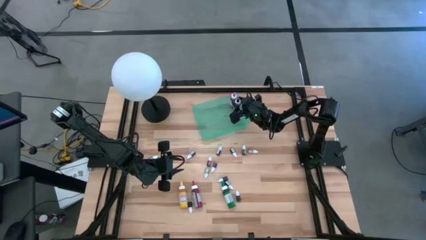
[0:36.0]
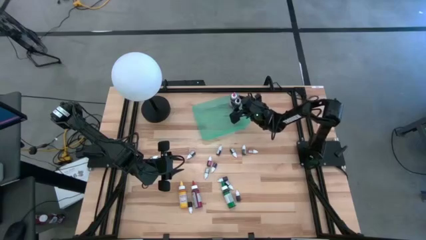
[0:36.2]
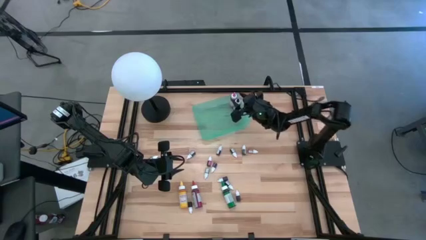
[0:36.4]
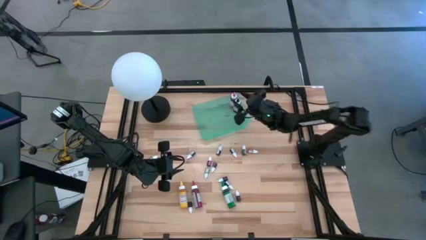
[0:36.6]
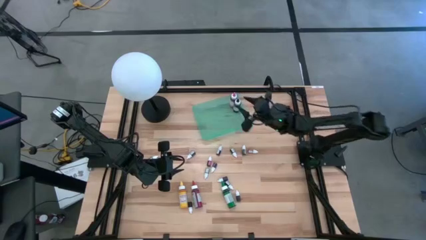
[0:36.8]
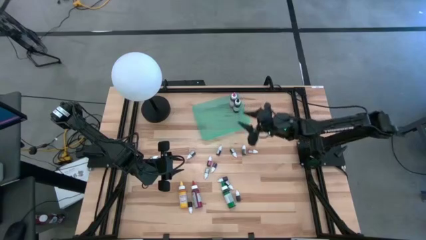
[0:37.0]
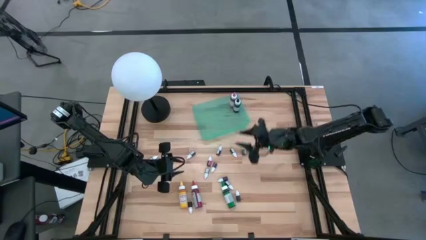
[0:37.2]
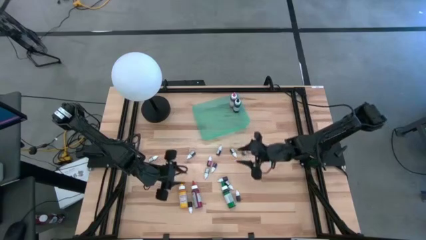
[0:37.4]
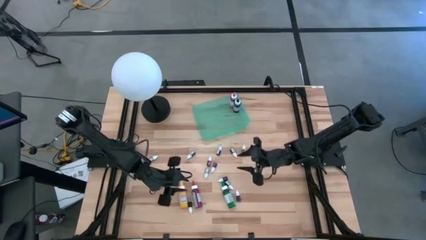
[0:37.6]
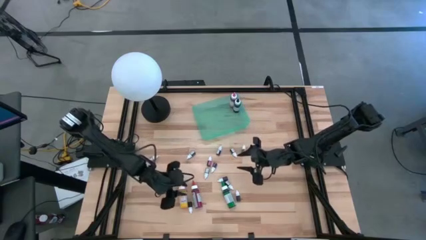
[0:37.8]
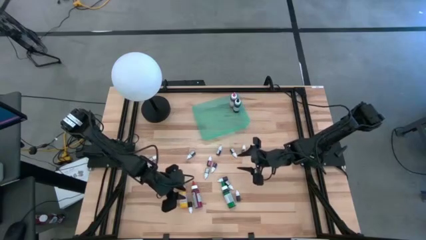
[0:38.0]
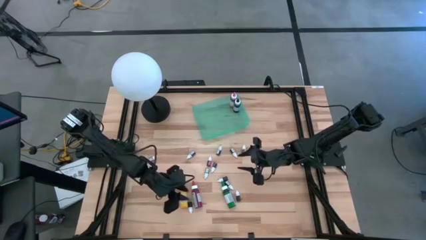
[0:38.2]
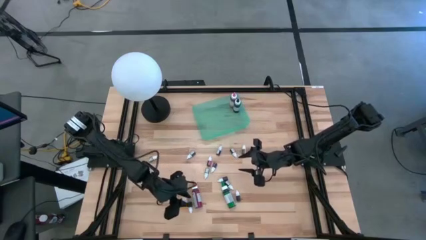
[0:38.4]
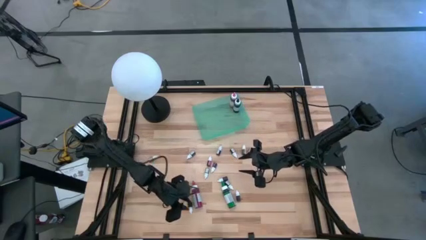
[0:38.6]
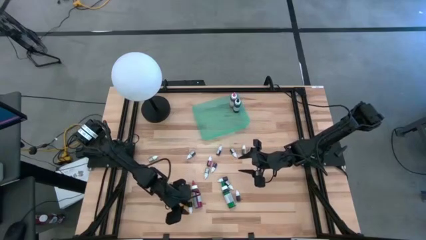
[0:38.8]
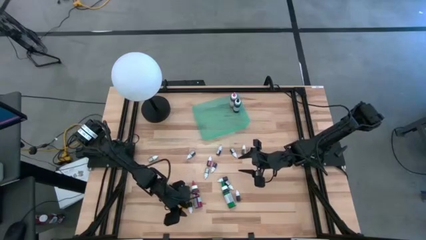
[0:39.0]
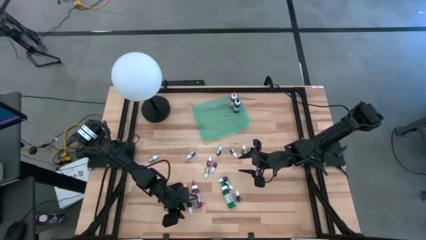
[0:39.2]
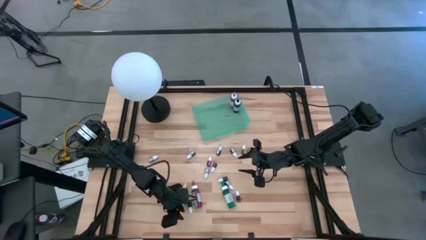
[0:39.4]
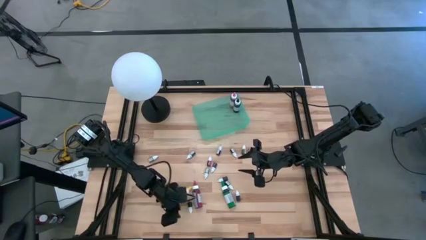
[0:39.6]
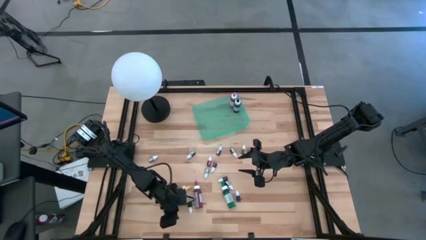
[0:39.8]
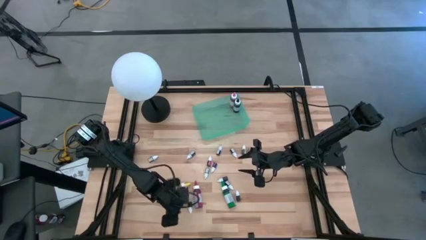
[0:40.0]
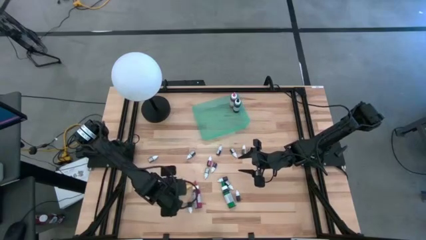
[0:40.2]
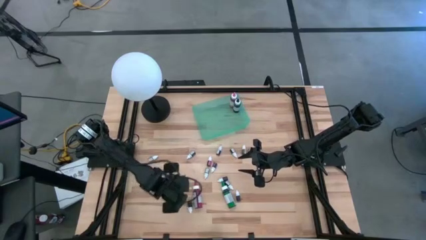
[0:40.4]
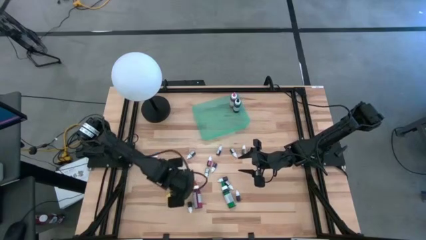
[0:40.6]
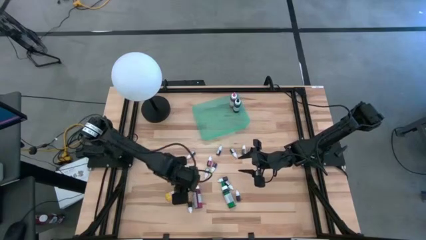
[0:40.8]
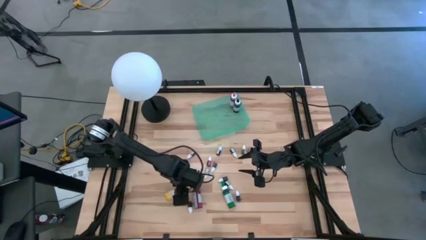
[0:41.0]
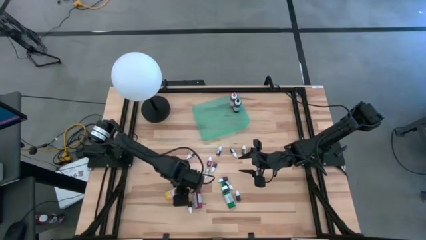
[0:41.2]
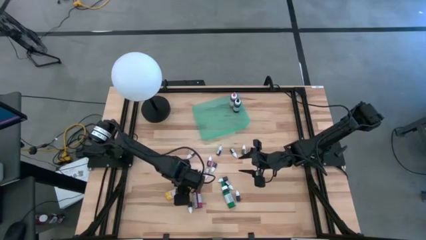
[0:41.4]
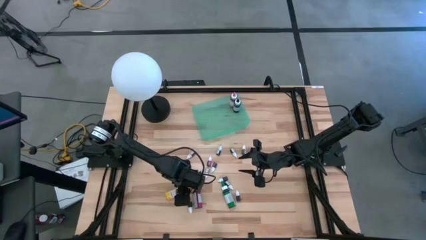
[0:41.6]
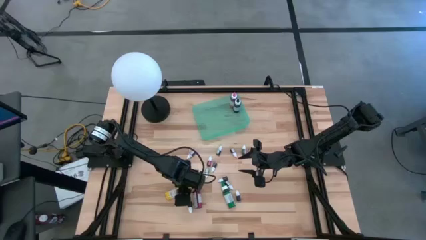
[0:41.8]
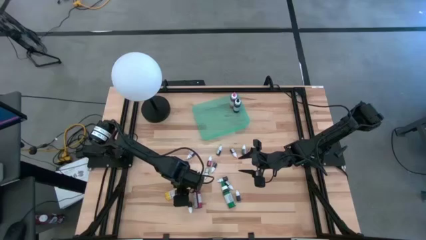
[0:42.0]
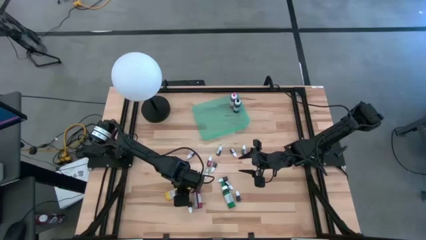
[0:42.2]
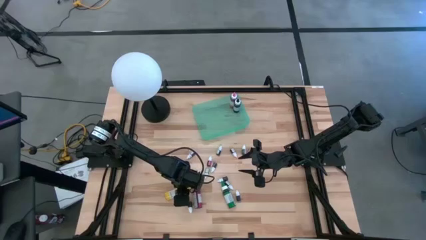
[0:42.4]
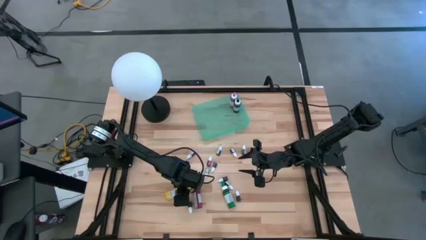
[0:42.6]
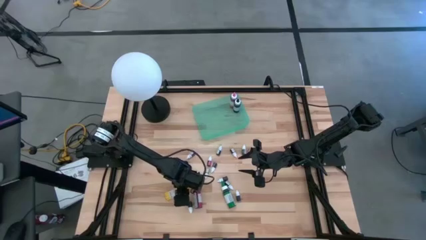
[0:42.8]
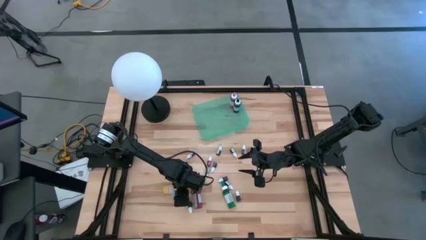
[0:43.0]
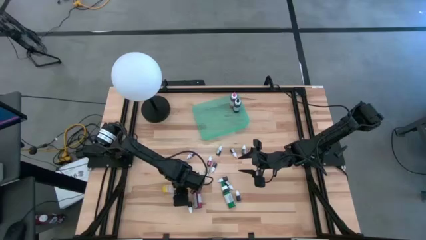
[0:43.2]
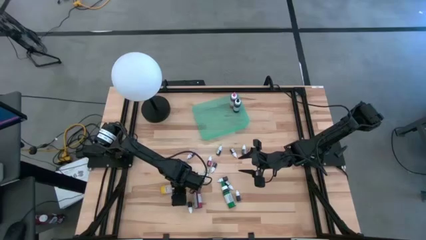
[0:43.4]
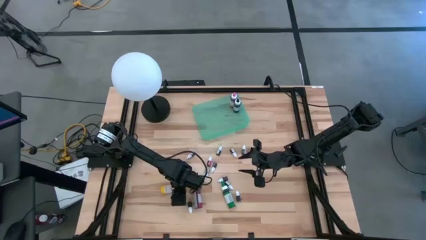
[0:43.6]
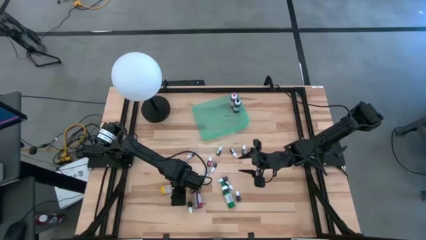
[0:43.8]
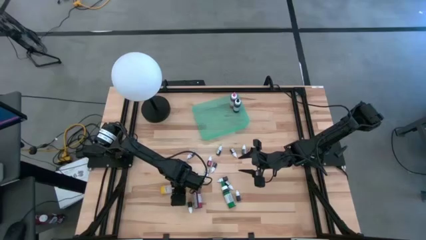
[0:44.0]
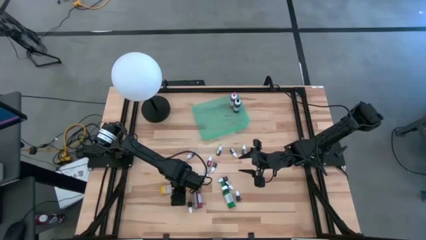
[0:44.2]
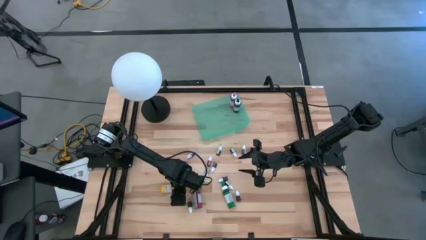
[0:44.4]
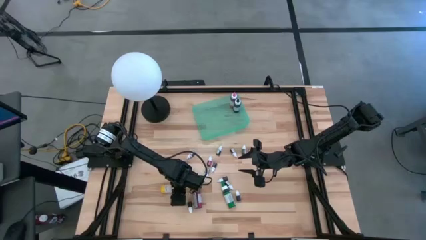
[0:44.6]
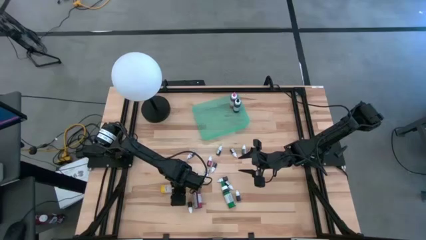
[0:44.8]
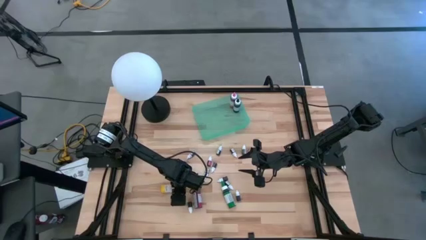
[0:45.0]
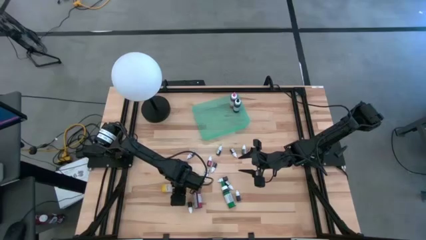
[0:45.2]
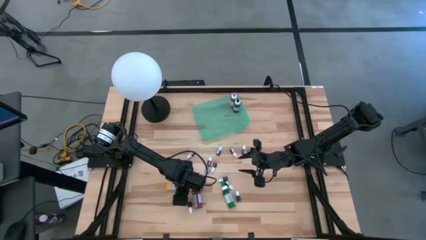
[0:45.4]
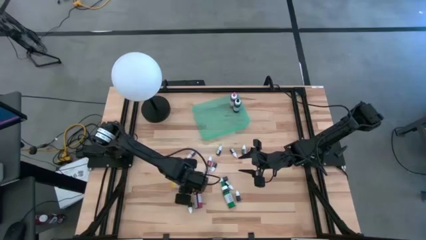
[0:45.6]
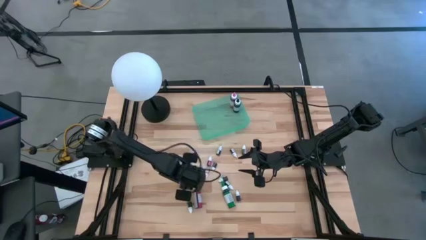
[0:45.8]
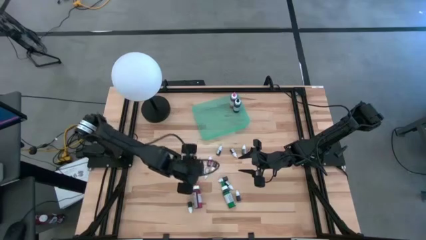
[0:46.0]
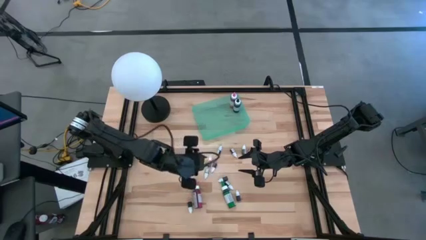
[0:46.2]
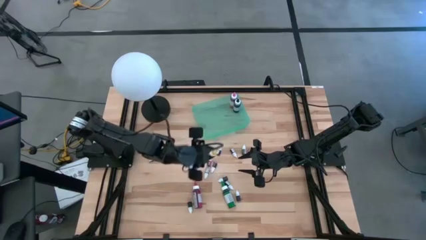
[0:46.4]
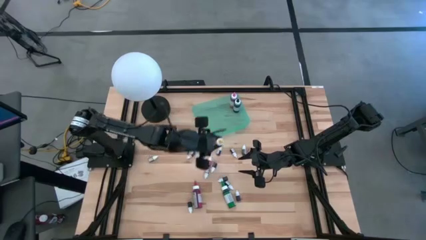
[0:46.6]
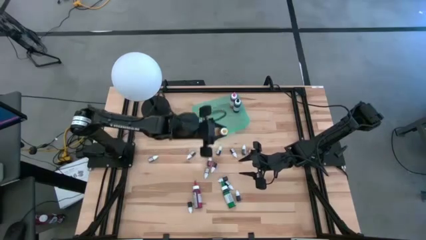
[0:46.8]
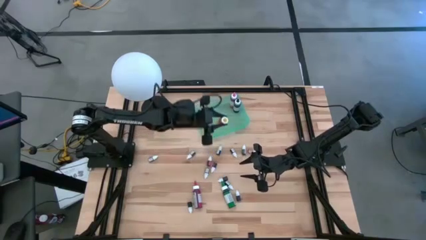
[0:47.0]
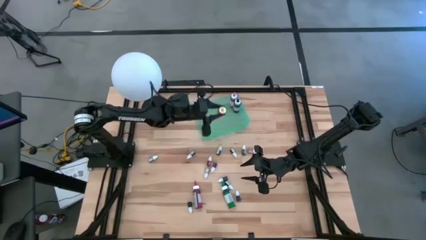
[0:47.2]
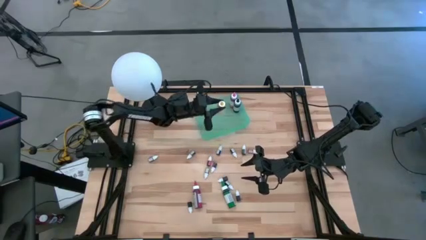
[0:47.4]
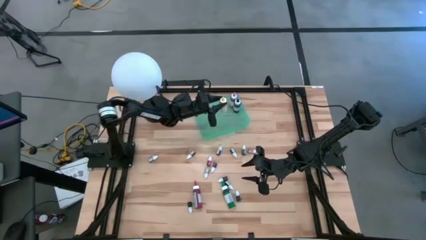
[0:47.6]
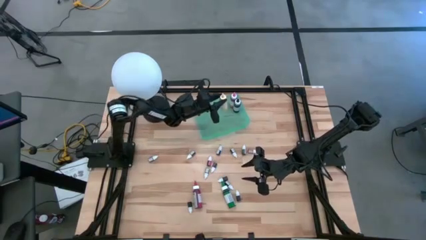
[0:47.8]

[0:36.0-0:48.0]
Task: Pick & Place food coloring
Put the yellow food coloring bottle into the green bin

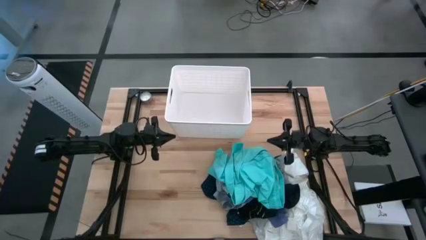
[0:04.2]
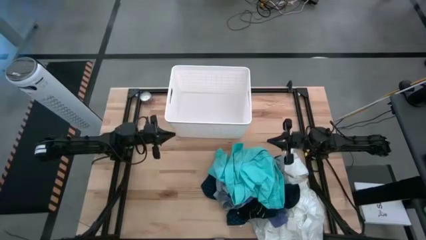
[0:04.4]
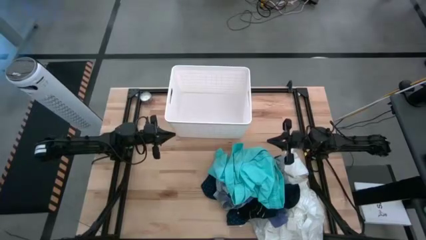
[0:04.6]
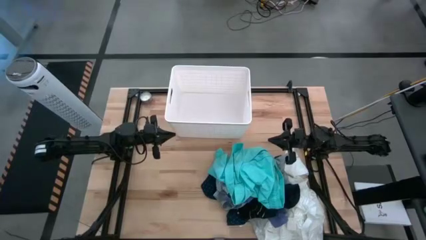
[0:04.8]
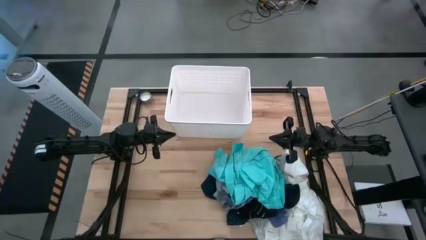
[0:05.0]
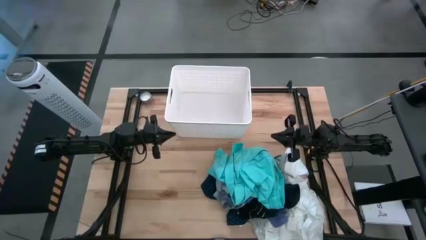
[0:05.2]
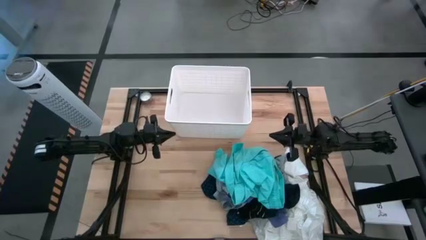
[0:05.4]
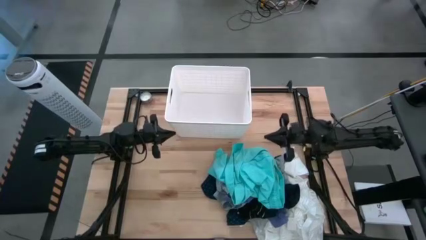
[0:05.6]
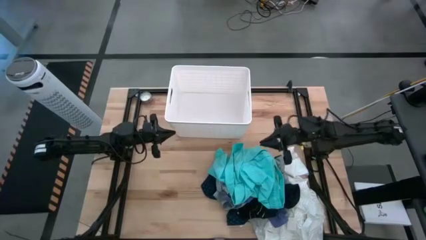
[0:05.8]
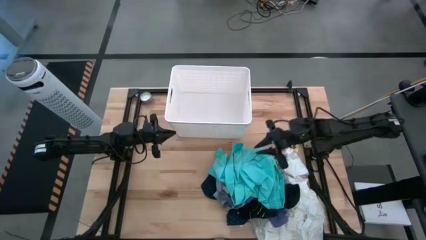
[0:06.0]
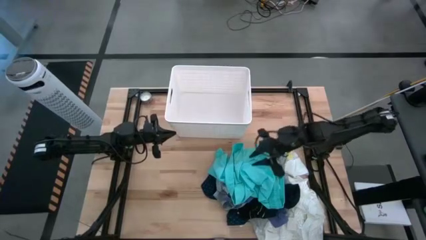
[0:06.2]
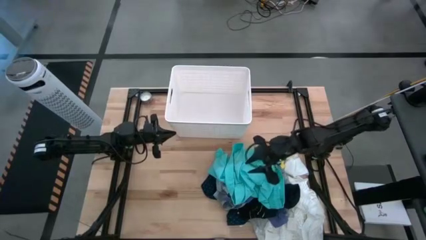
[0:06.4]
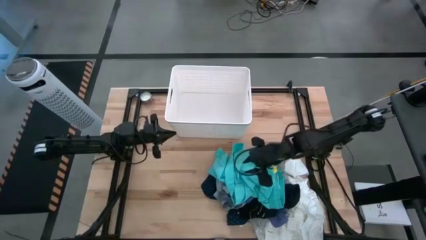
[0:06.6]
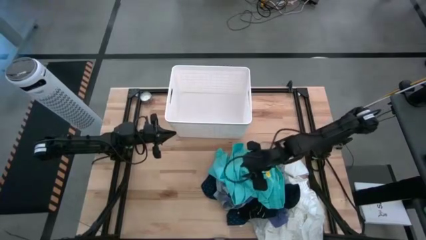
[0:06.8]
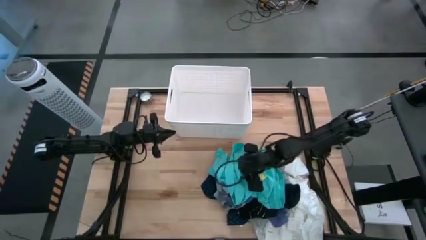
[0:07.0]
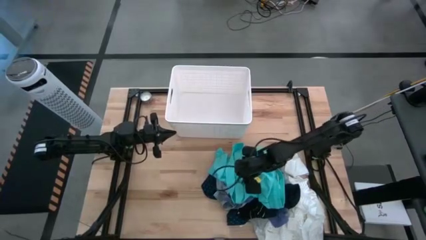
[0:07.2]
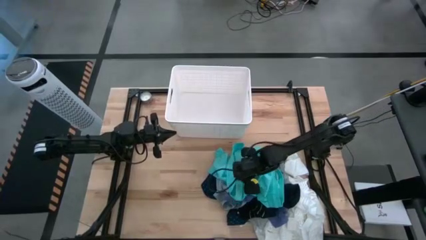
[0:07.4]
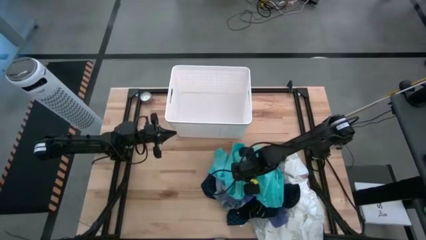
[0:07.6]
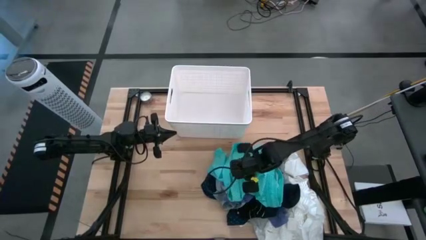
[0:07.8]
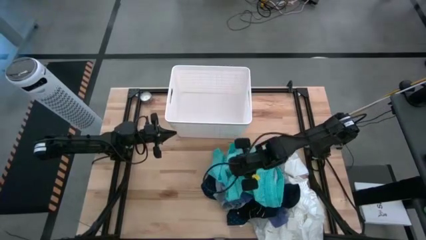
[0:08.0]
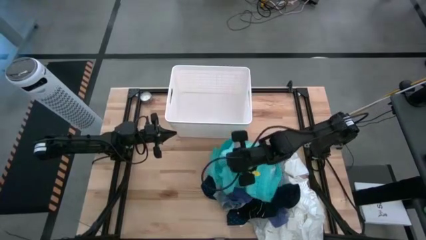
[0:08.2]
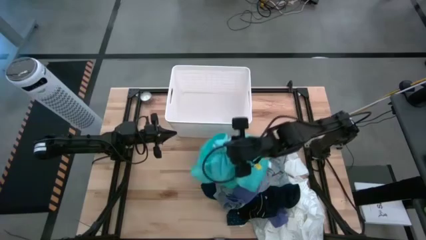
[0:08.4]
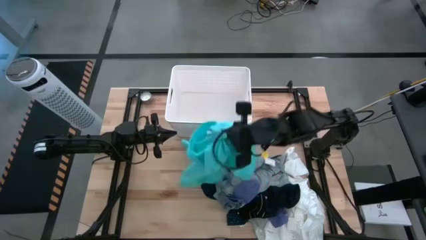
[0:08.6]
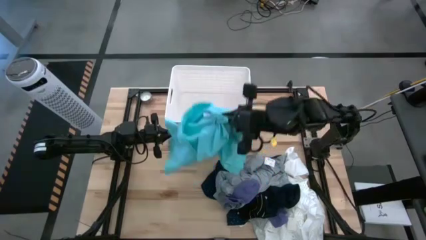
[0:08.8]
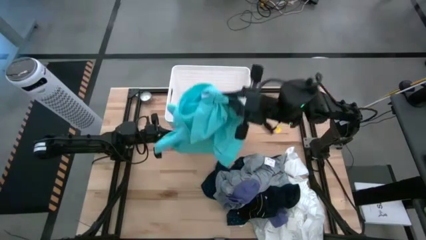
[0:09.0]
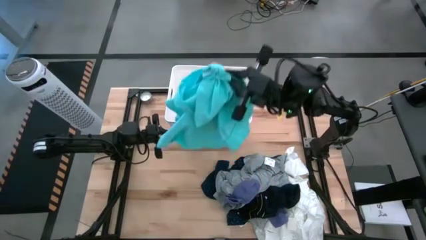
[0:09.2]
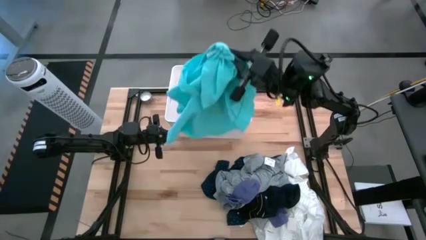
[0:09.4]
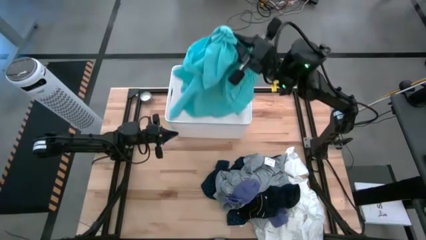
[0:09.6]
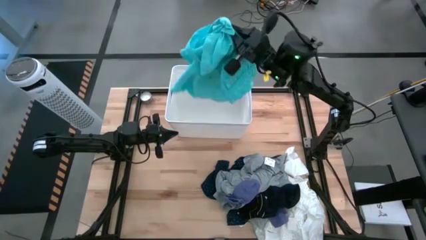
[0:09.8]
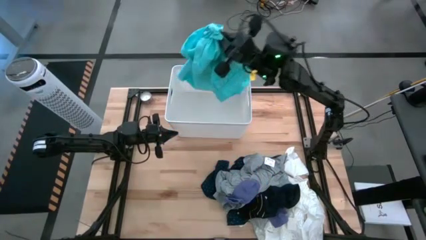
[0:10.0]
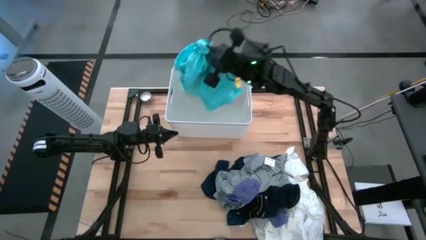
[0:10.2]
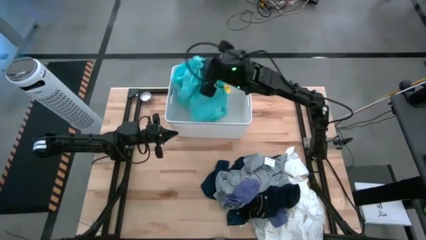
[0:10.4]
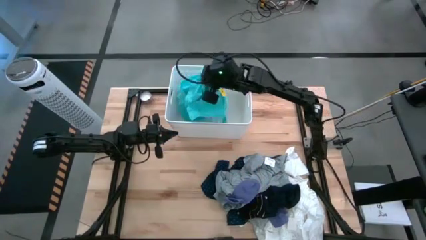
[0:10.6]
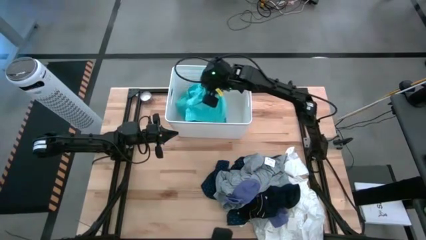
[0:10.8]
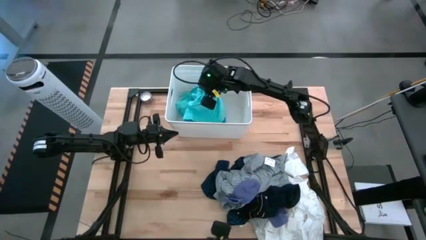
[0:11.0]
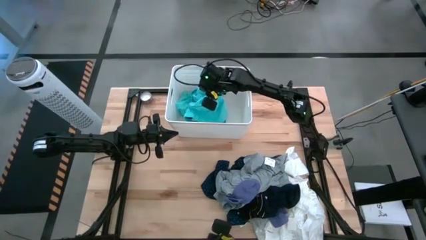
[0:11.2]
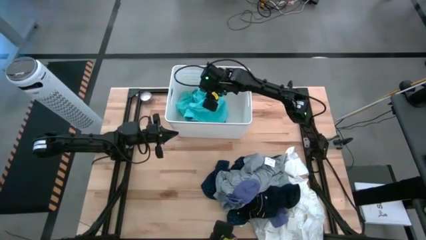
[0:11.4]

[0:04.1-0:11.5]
Task: Sort clothes
Put the blue shorts into the laundry organizer
